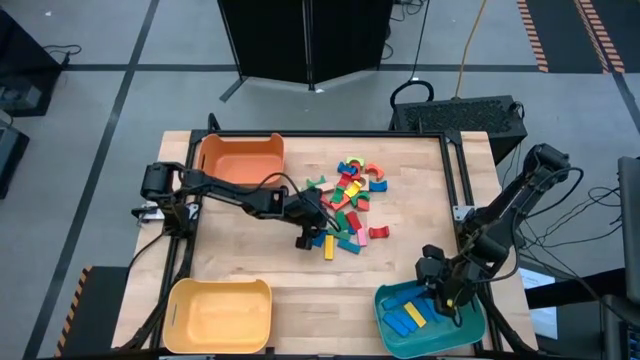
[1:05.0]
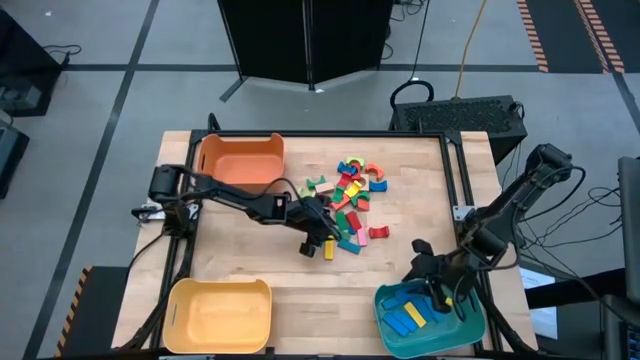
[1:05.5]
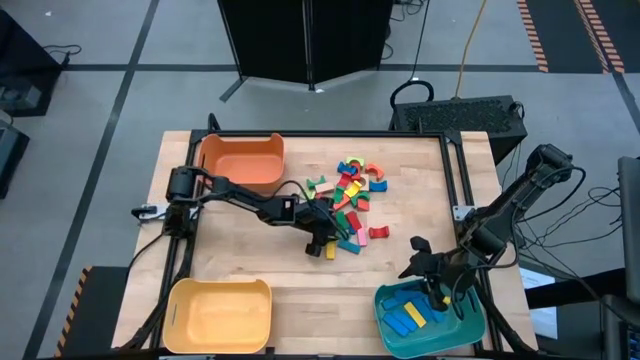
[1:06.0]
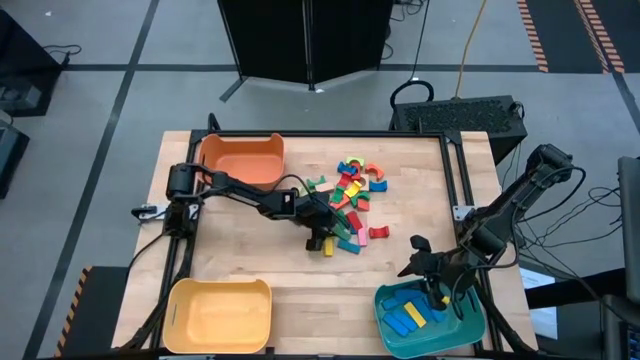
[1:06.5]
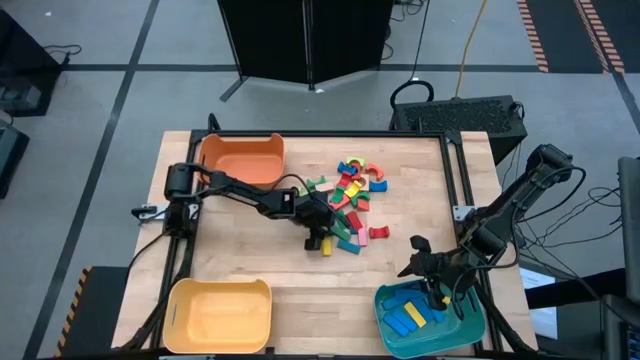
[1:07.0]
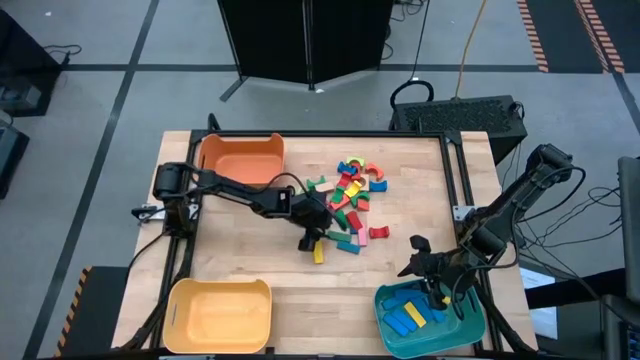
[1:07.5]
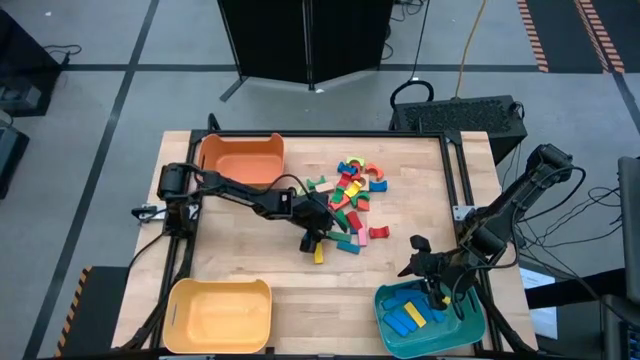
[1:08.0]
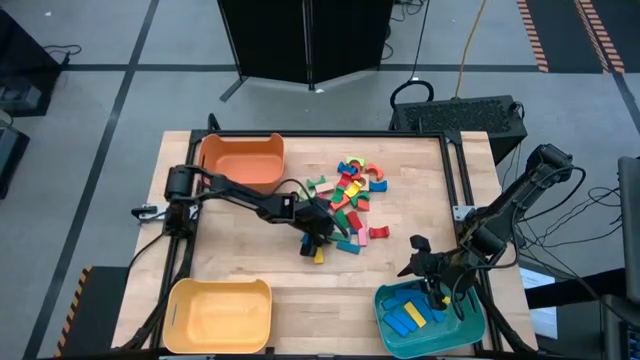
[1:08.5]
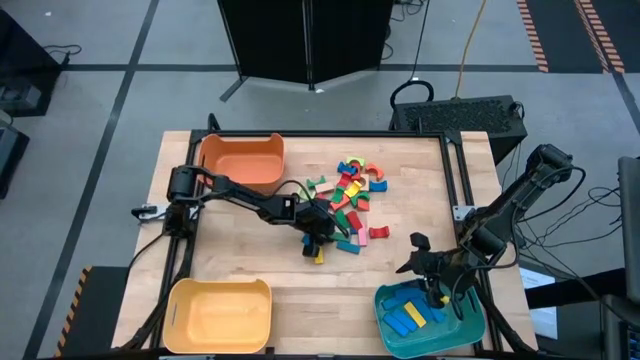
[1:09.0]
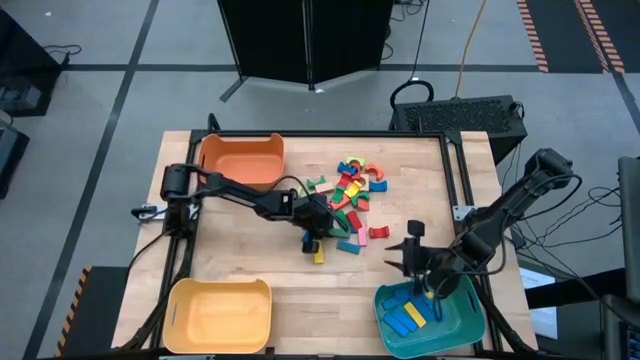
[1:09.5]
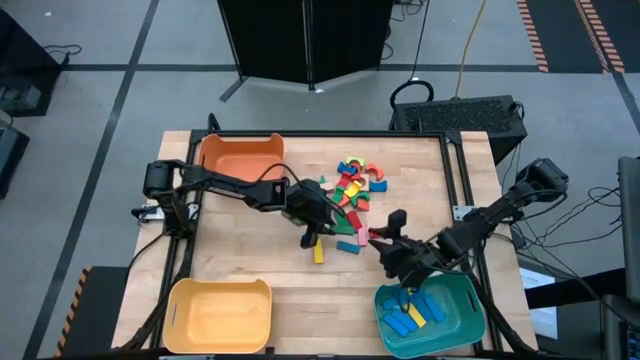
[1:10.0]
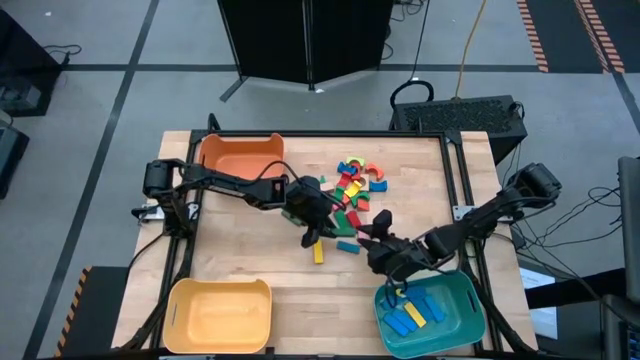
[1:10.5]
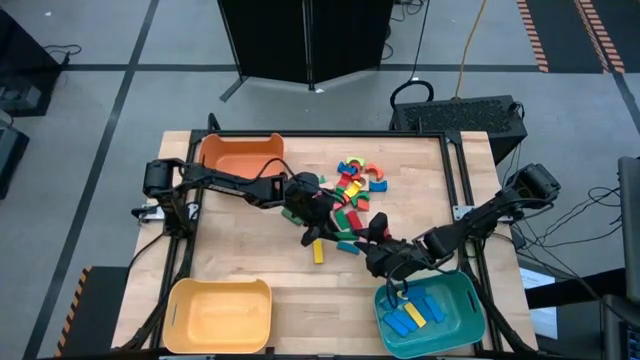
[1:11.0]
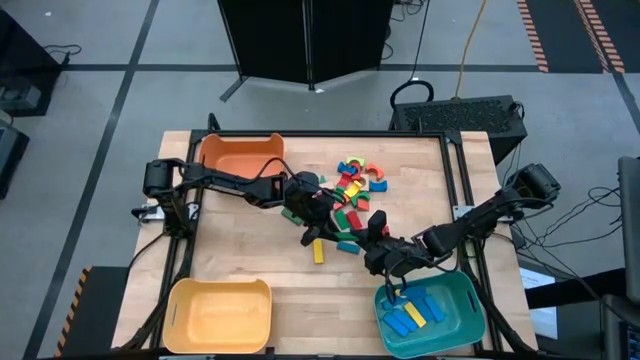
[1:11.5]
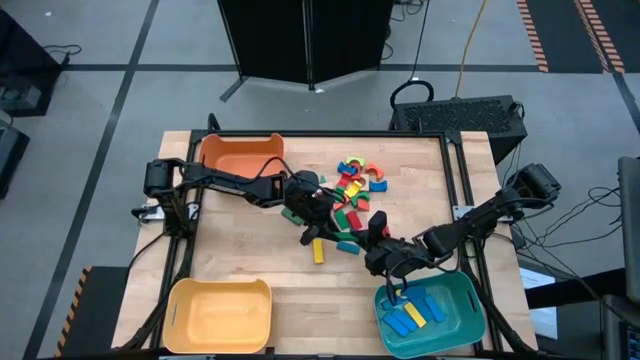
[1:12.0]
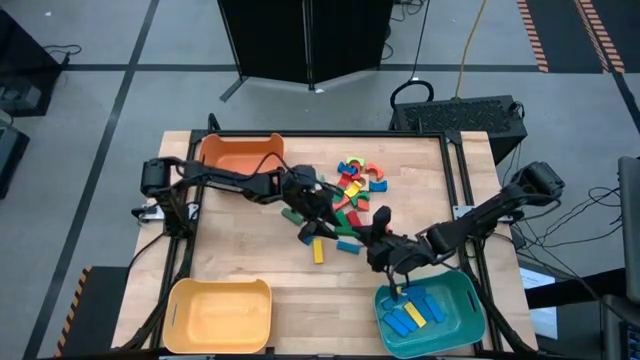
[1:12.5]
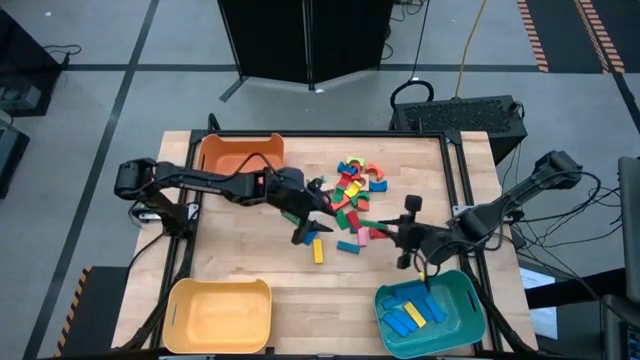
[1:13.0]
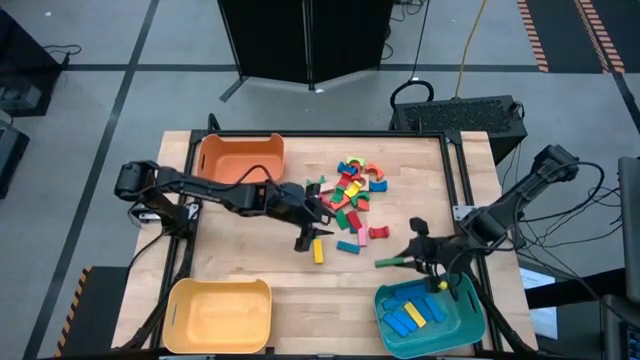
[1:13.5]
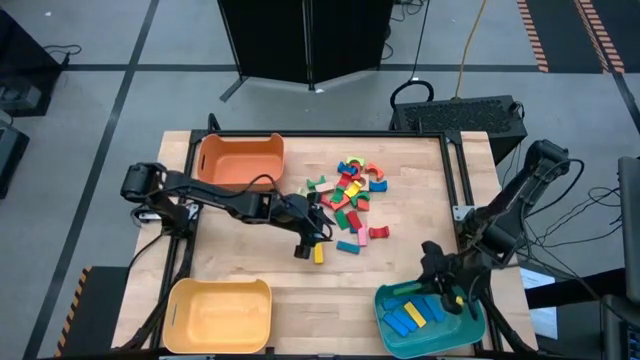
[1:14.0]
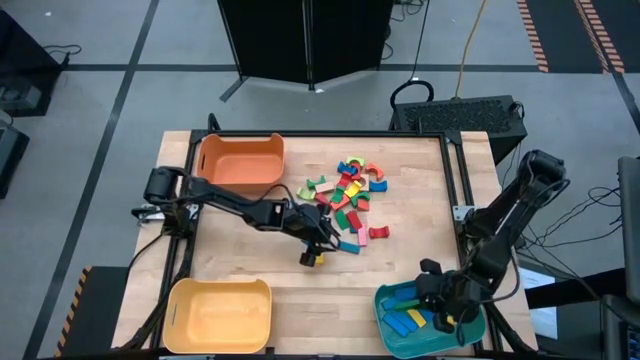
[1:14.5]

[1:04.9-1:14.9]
Task: Sort blocks by size
Put the green rectangular block into the blue bin

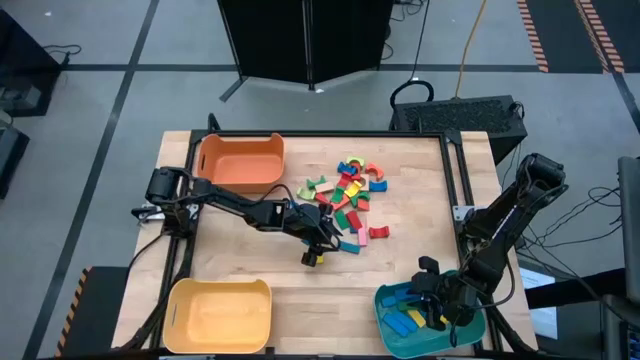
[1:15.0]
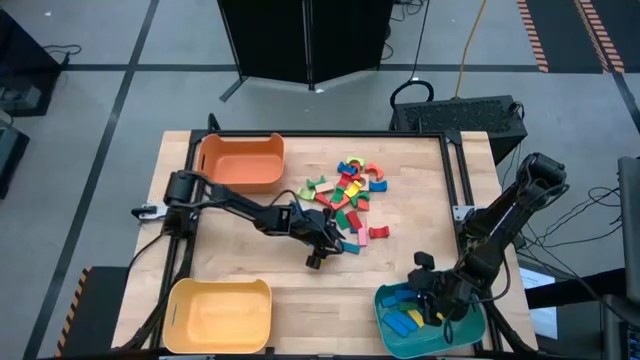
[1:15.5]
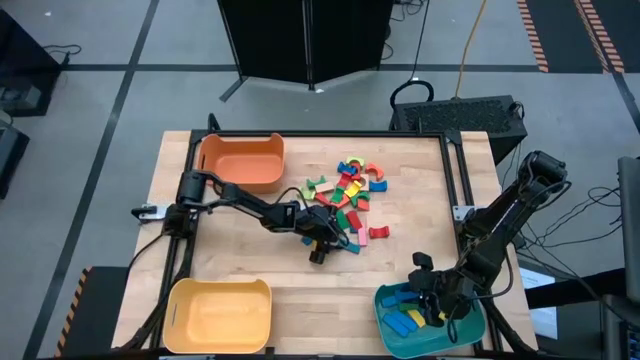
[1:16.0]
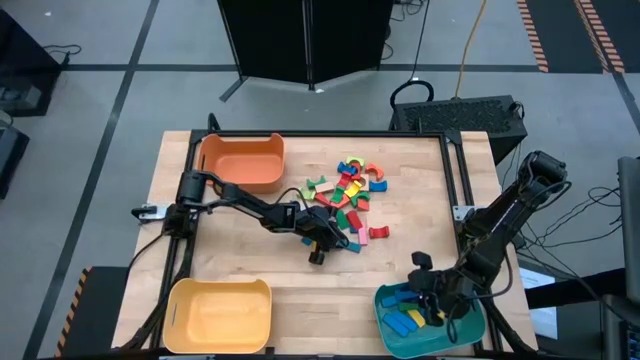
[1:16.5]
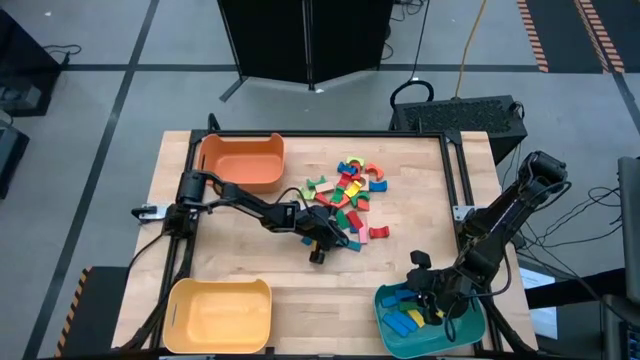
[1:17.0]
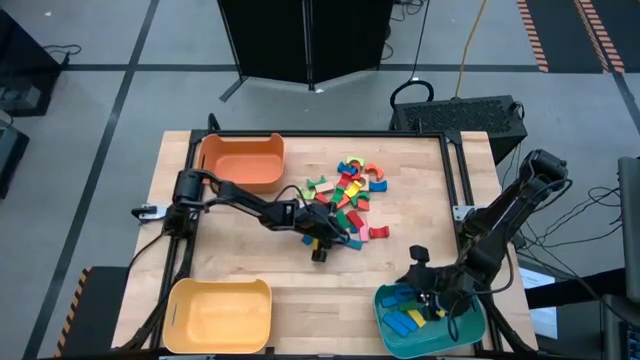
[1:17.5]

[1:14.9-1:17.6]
Put the blue rectangular block into the blue bin

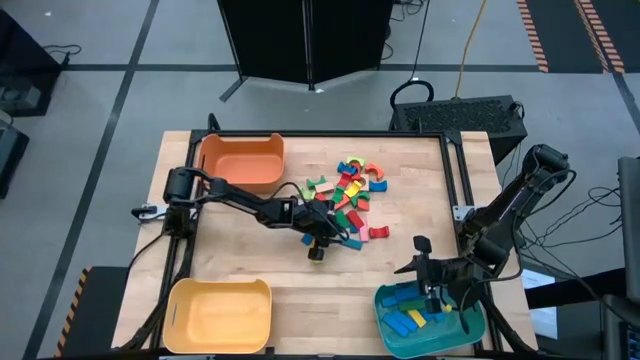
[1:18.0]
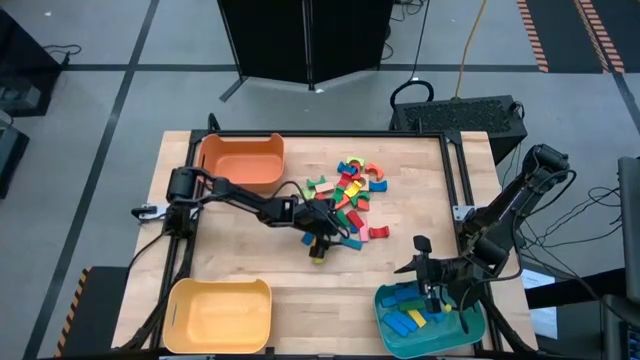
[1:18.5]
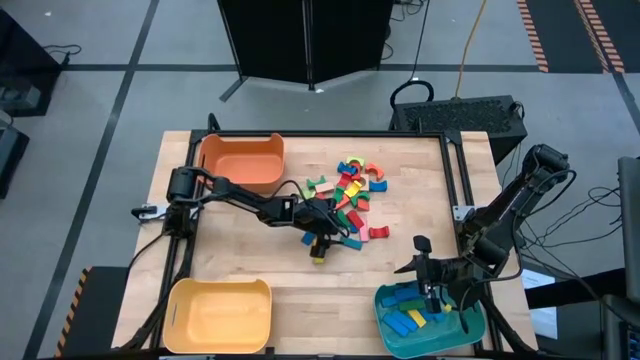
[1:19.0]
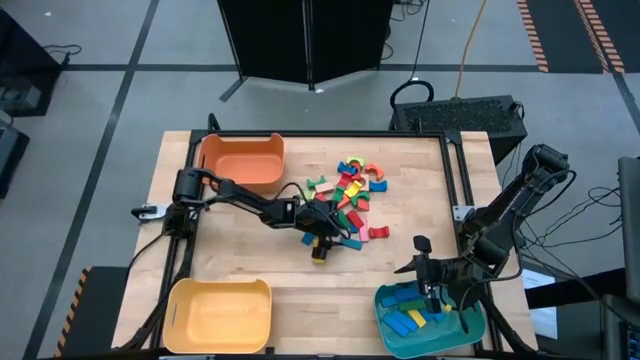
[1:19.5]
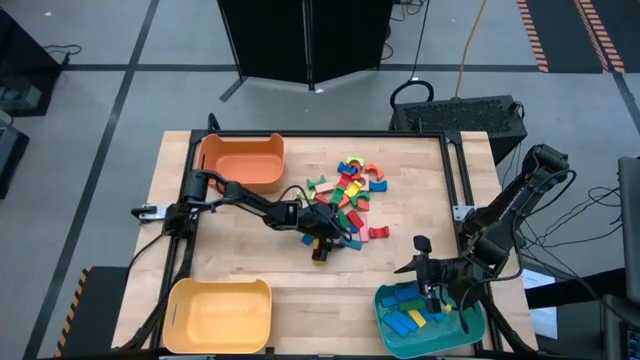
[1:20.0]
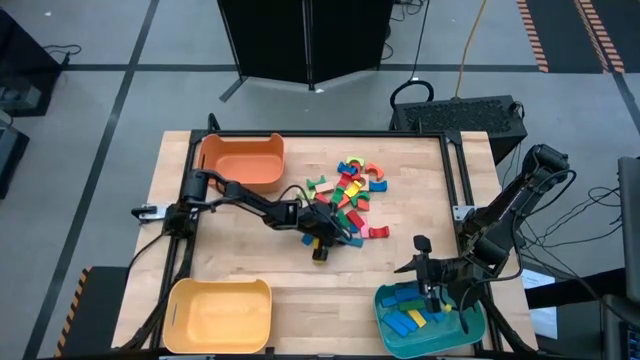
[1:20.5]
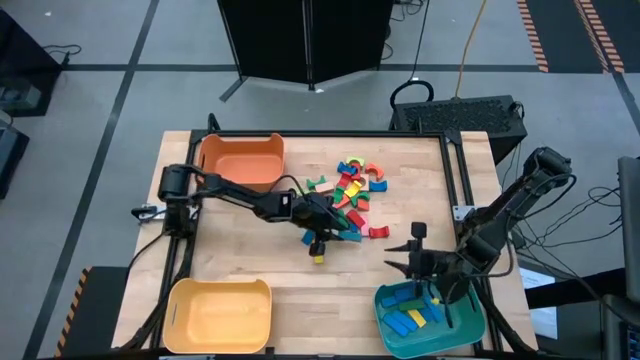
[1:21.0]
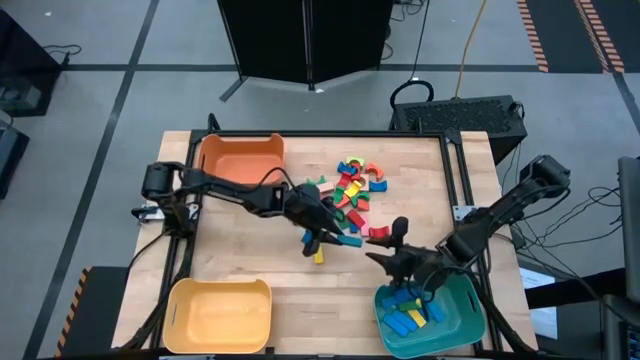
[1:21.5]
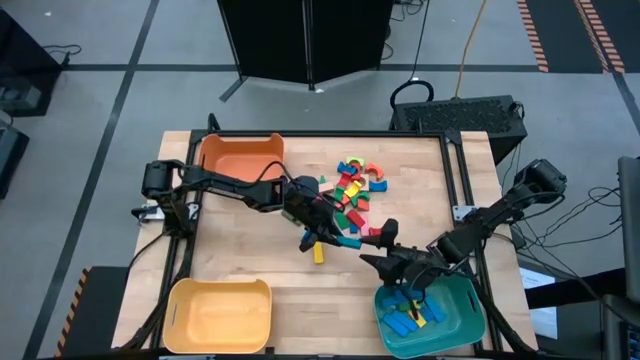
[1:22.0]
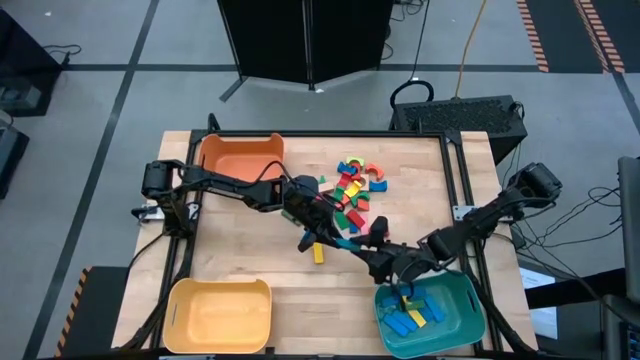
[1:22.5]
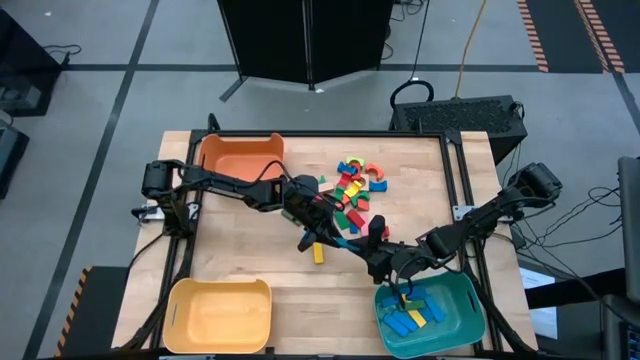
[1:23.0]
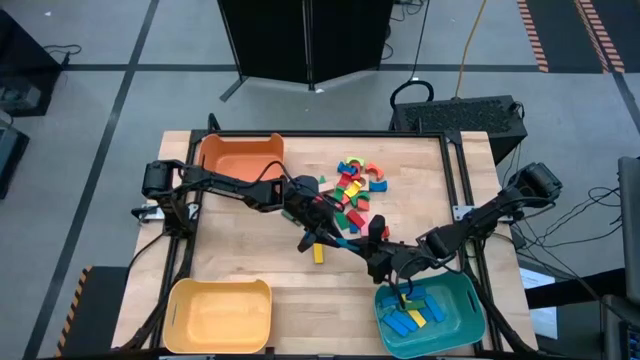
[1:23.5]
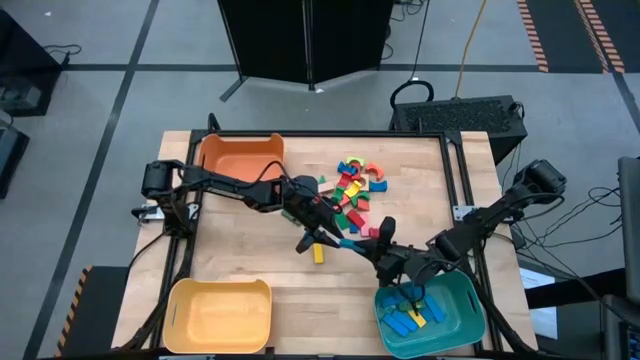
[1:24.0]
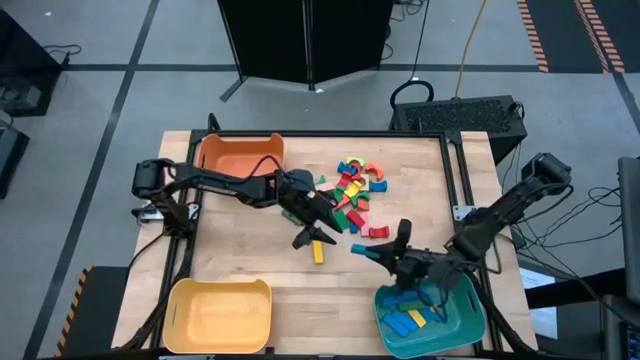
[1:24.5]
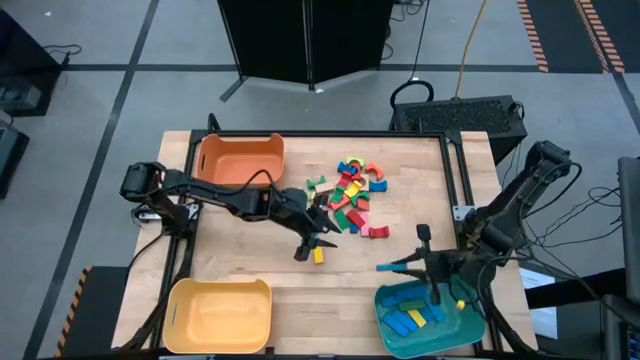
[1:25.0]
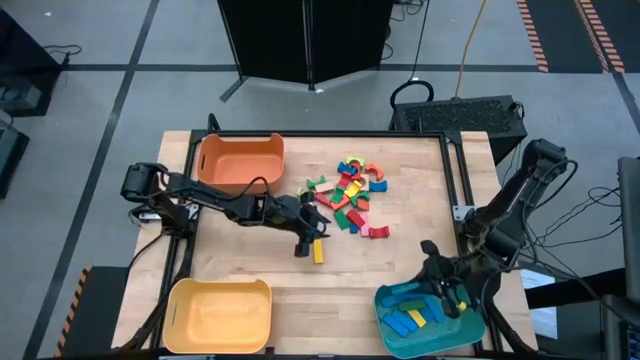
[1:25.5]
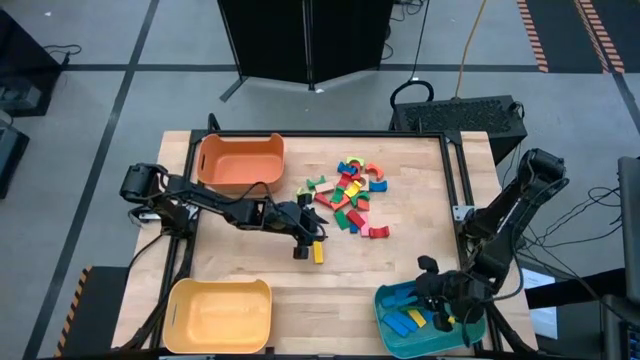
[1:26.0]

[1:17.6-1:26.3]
Put the blue rectangular block into the blue bin
